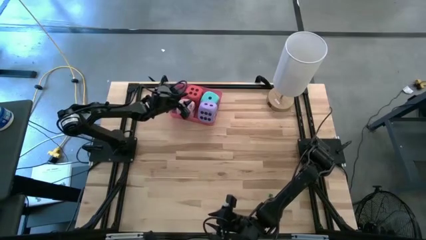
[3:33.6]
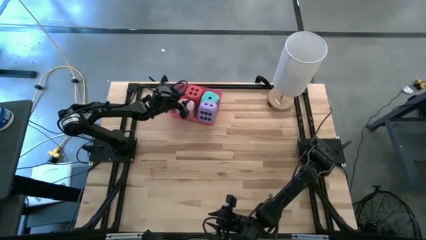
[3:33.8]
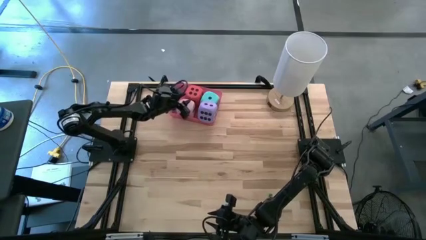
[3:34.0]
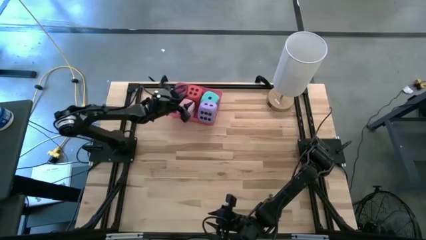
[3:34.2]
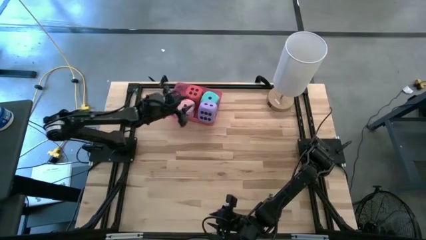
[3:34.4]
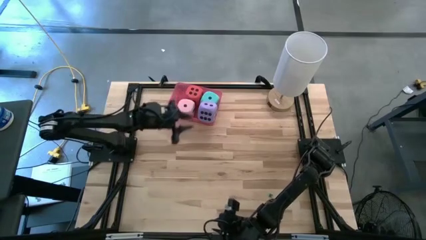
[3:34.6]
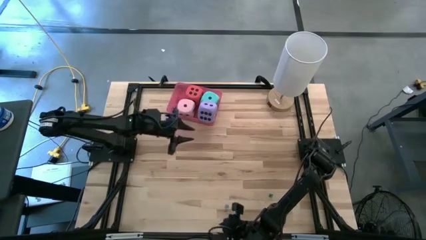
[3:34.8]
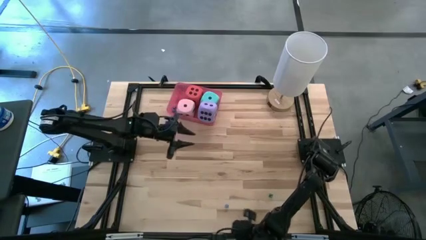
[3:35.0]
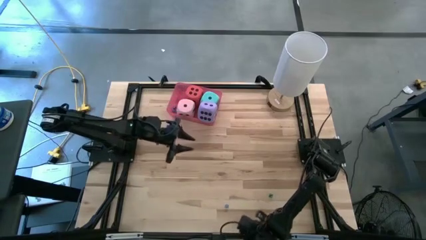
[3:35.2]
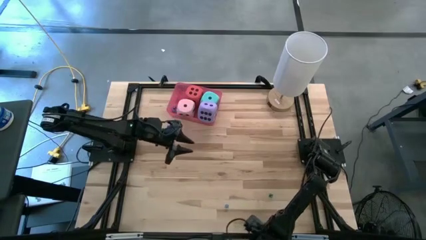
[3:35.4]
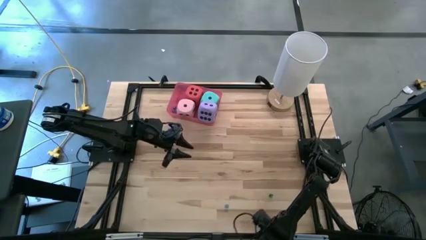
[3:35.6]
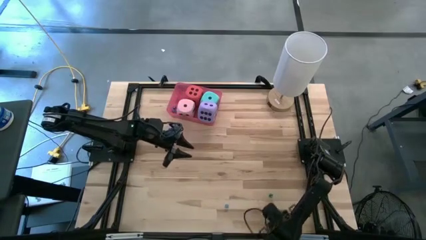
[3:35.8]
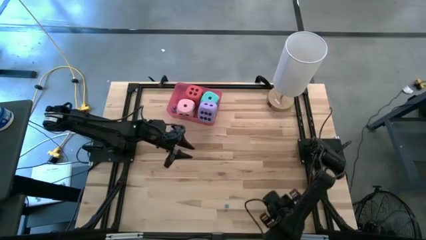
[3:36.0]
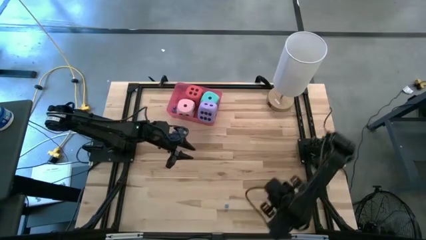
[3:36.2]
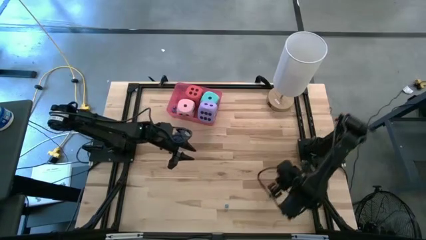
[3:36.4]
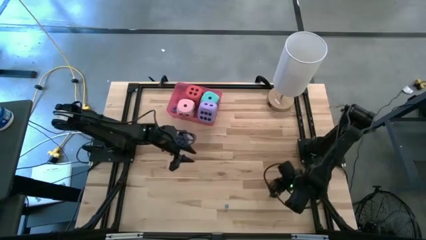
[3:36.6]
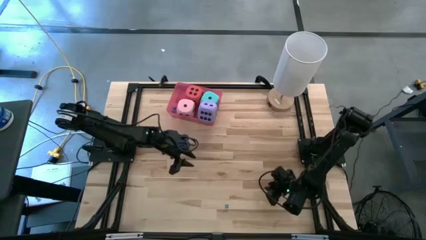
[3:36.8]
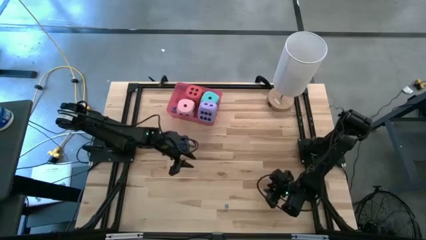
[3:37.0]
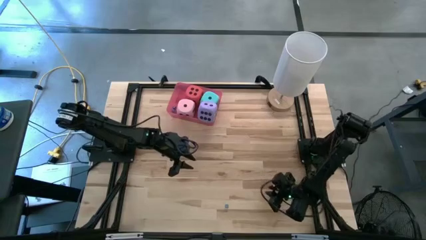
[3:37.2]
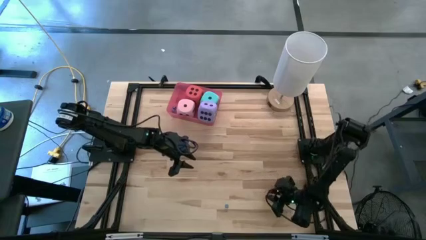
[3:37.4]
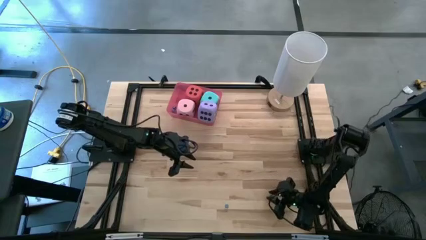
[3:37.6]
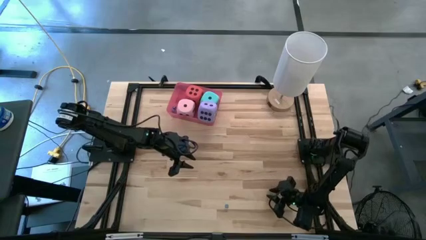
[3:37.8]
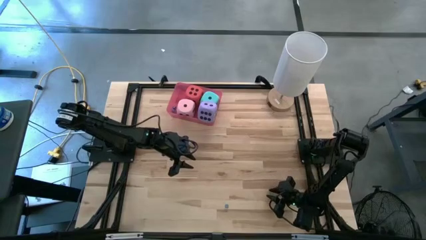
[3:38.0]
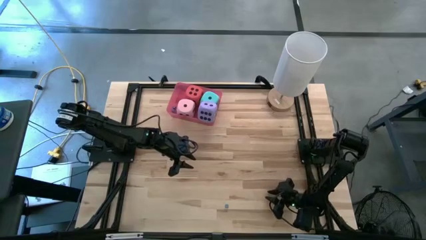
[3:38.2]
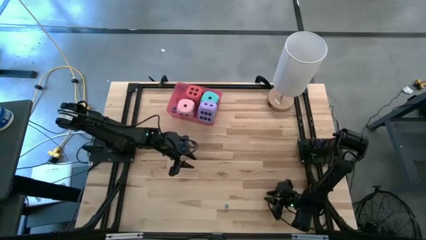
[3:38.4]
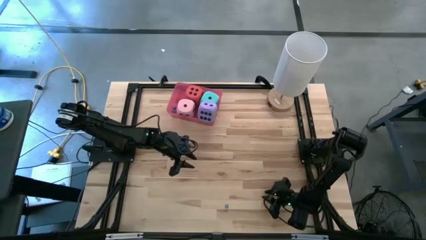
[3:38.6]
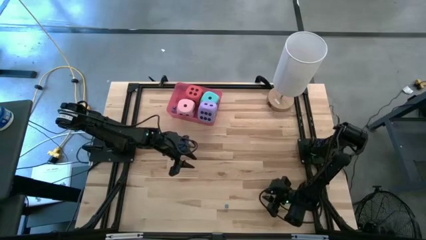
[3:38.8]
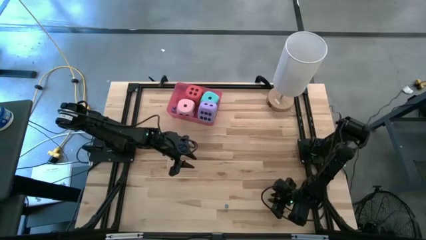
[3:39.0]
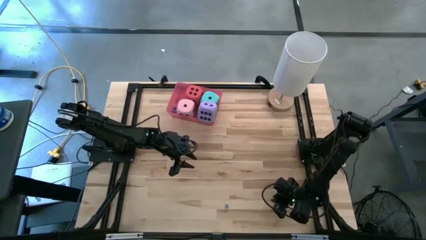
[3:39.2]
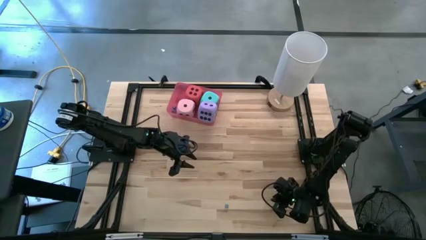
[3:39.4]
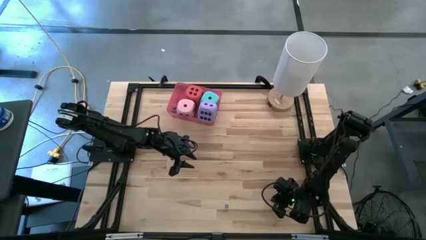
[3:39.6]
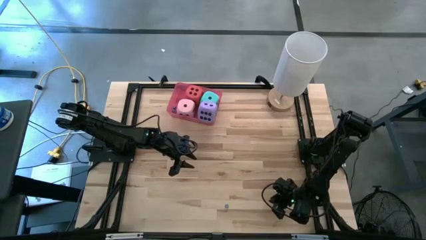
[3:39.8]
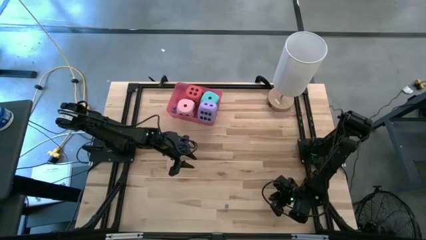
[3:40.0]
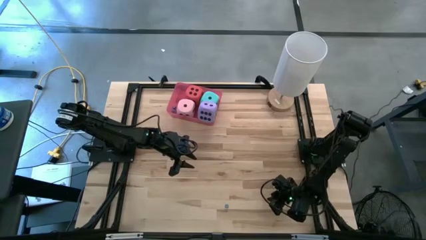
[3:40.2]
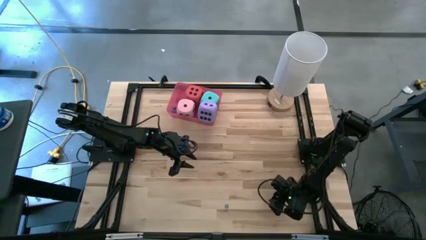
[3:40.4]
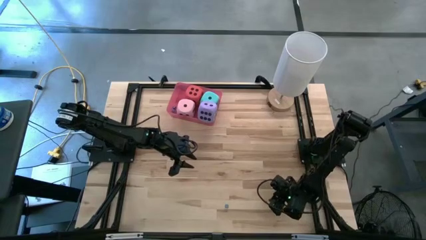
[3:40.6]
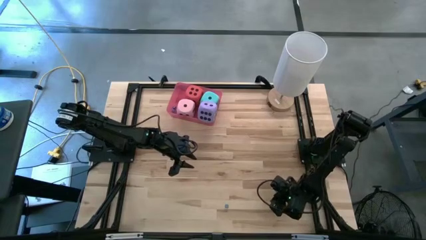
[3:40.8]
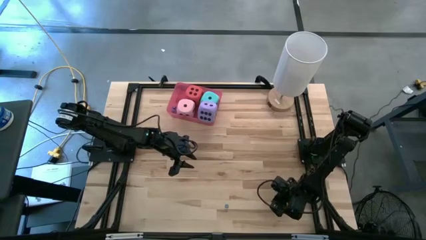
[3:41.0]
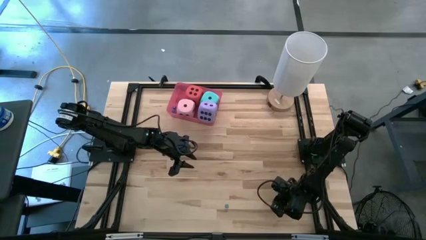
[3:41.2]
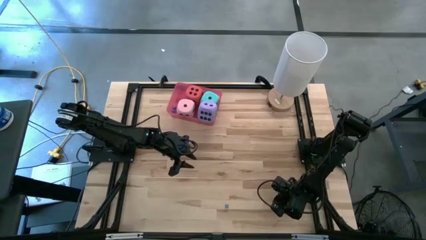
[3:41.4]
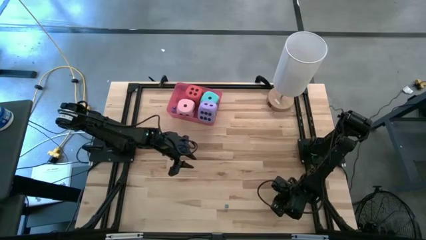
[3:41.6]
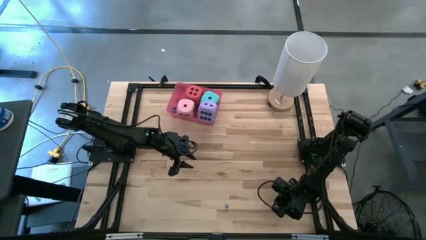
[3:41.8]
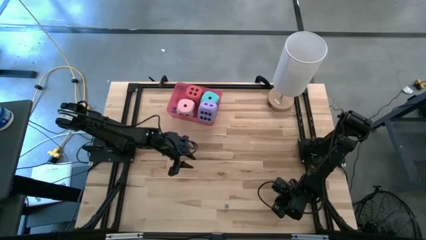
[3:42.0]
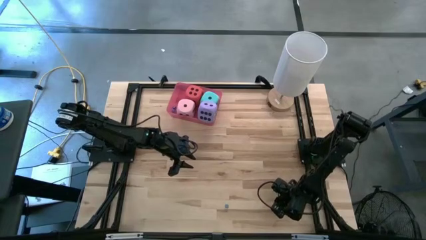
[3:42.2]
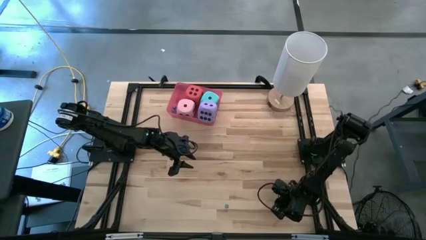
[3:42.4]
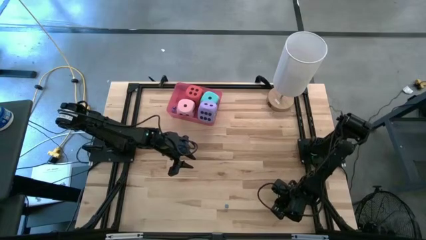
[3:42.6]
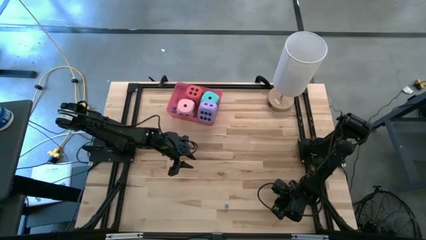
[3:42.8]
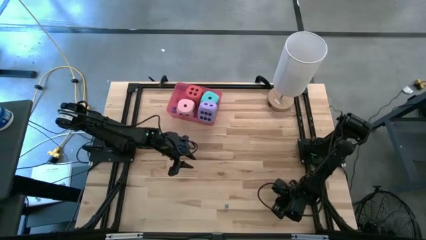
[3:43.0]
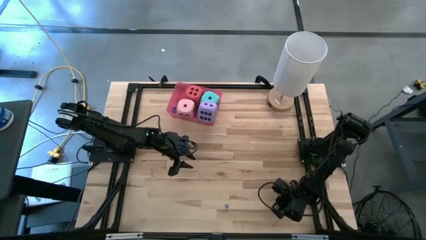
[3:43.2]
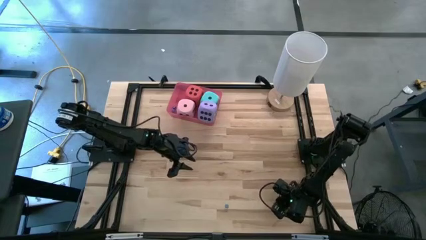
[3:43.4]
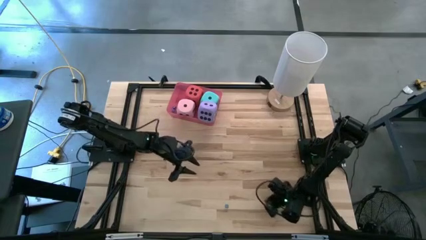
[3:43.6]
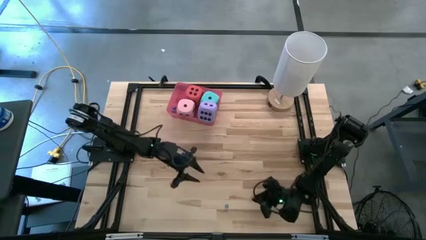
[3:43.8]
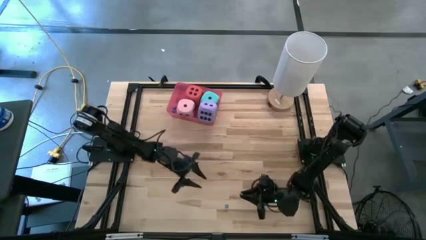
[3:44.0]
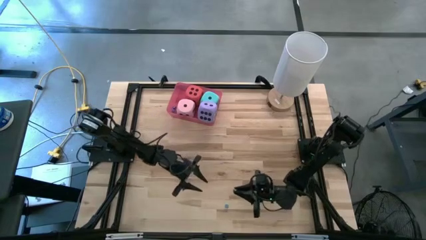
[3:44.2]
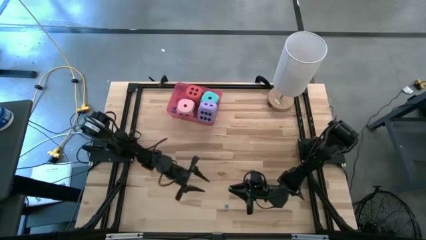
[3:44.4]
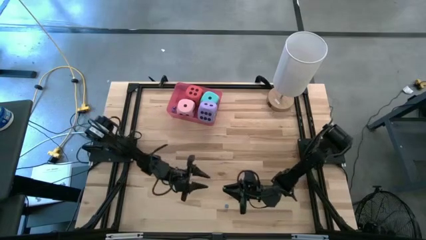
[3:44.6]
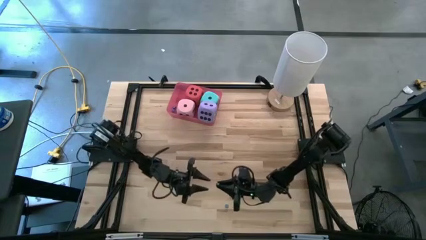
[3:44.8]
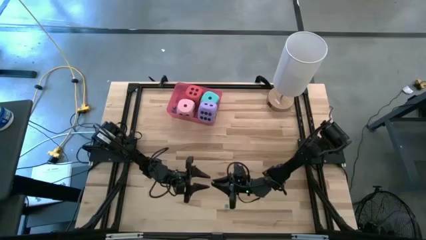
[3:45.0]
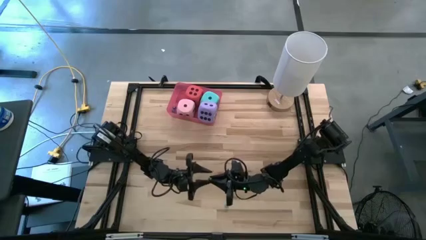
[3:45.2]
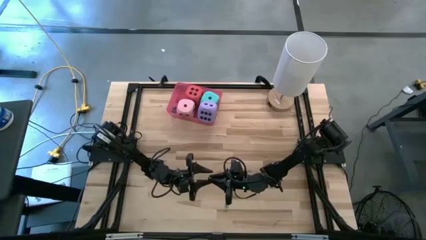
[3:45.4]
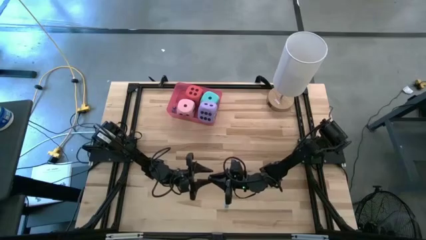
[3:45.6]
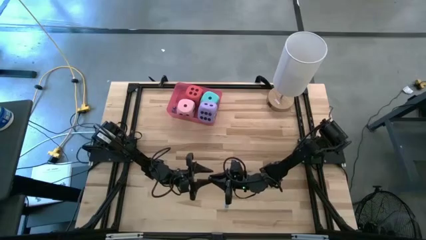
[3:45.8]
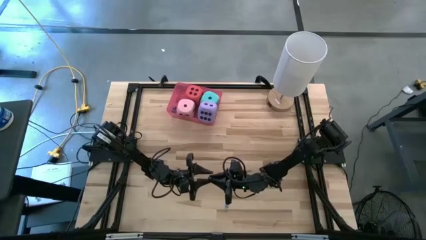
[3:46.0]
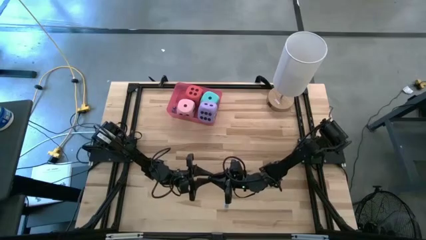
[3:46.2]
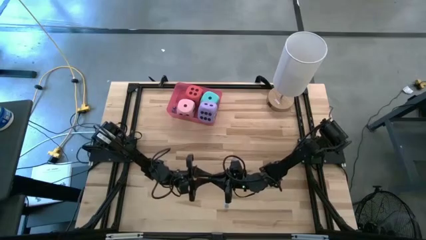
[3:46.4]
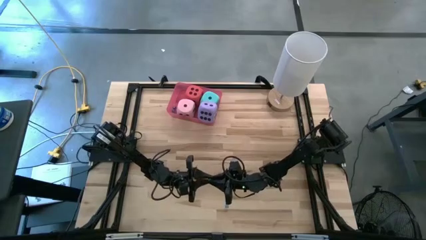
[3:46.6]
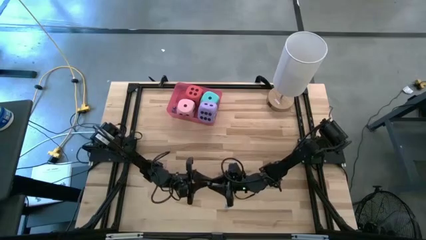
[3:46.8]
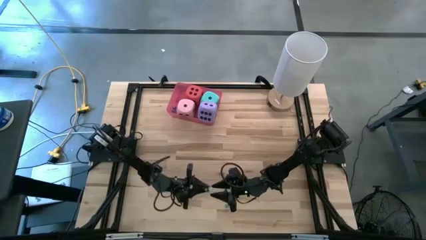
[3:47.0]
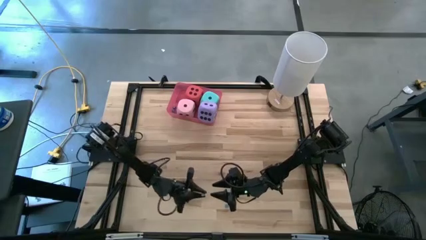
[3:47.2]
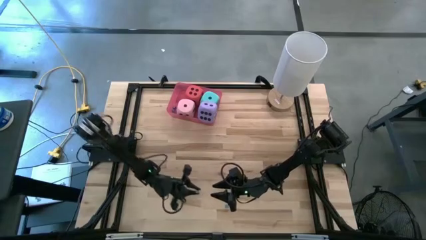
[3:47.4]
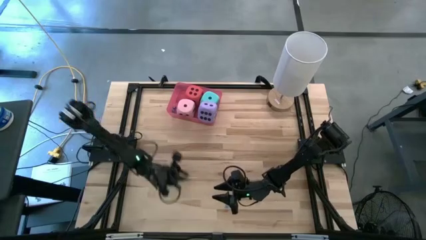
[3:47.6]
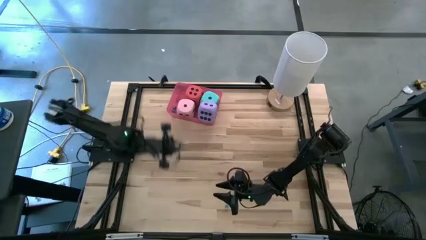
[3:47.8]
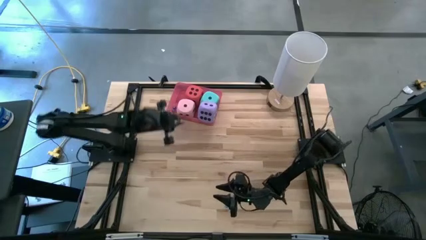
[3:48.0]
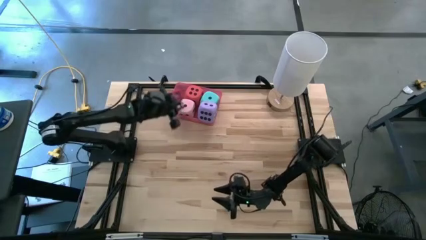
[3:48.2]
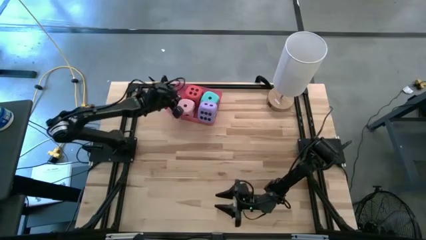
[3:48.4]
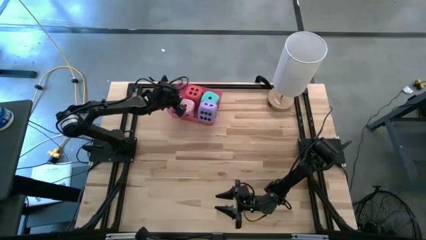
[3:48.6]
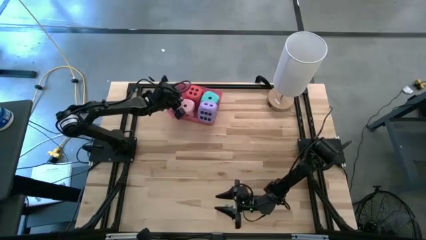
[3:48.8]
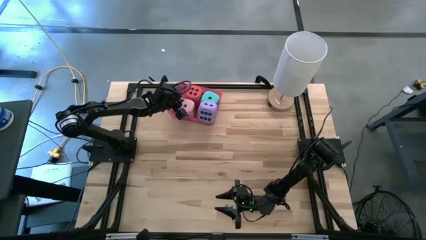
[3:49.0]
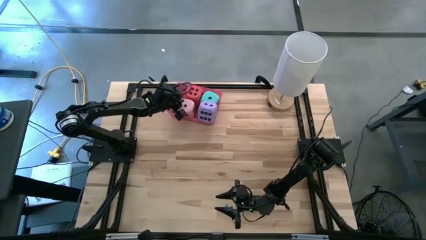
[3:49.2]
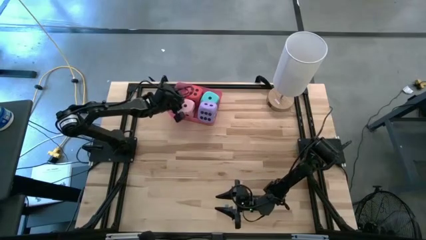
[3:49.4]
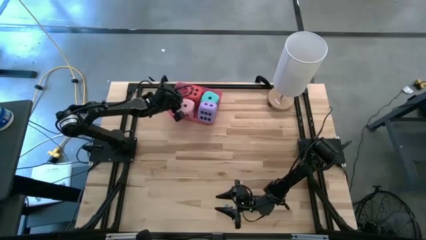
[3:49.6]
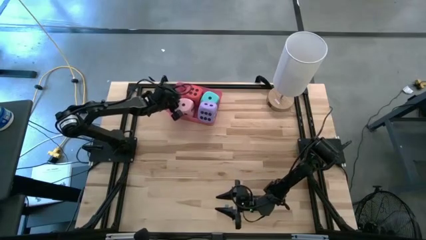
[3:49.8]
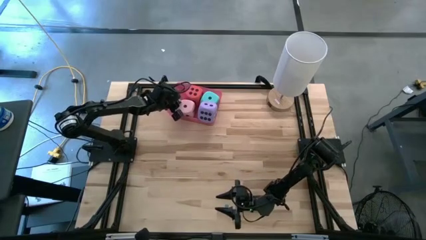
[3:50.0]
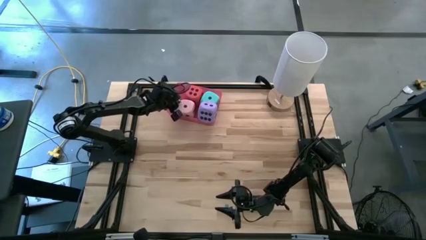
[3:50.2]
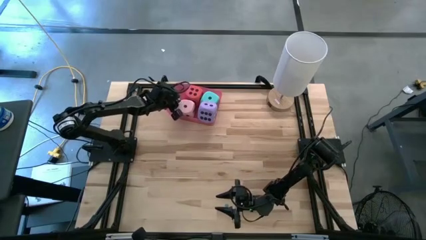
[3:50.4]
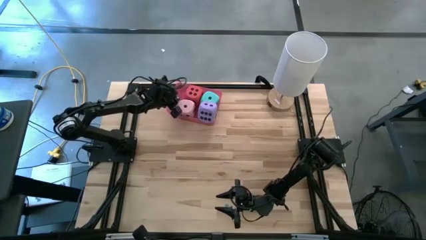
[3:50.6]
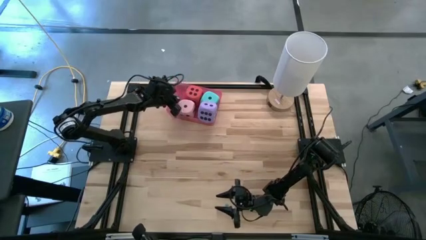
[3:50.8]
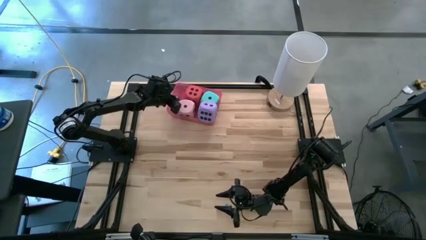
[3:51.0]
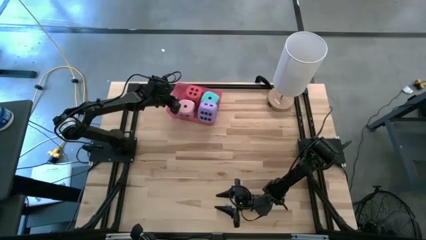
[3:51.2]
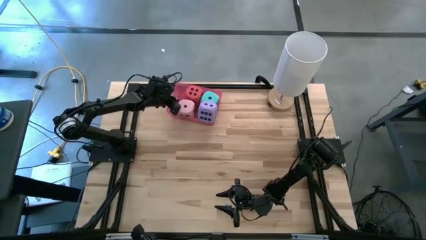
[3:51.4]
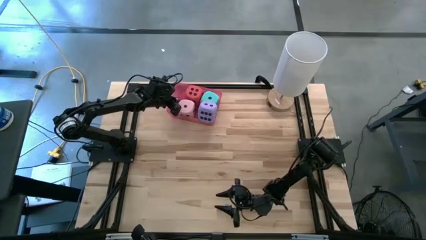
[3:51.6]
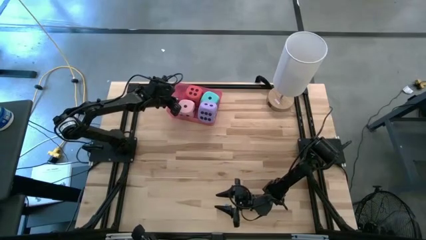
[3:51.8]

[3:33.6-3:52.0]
Task: Pick & Place Dice
Put the small green dice into the pink bin
